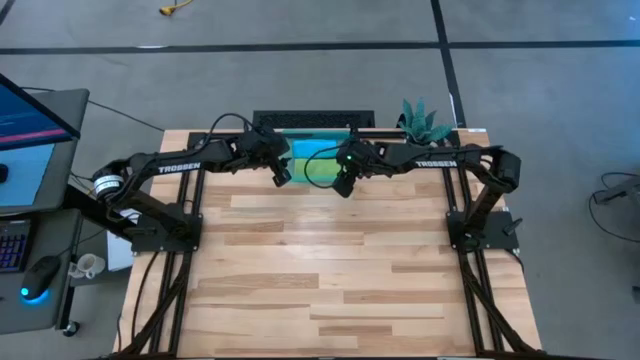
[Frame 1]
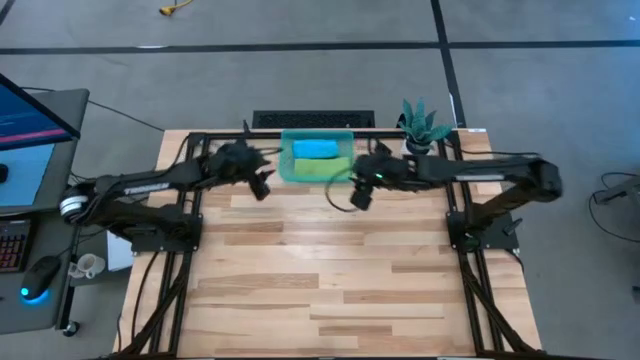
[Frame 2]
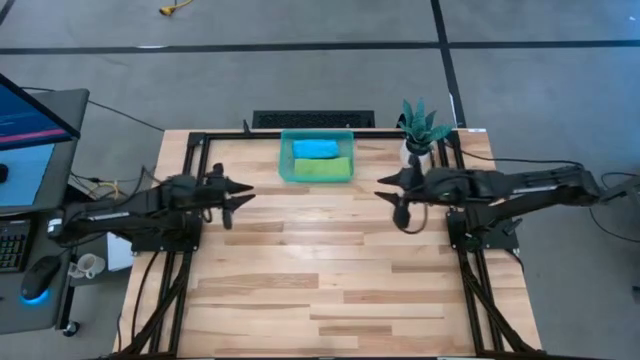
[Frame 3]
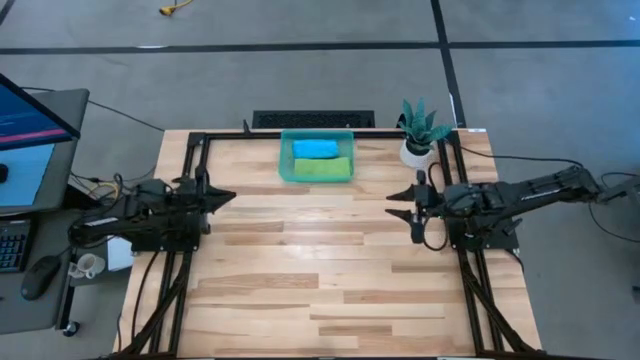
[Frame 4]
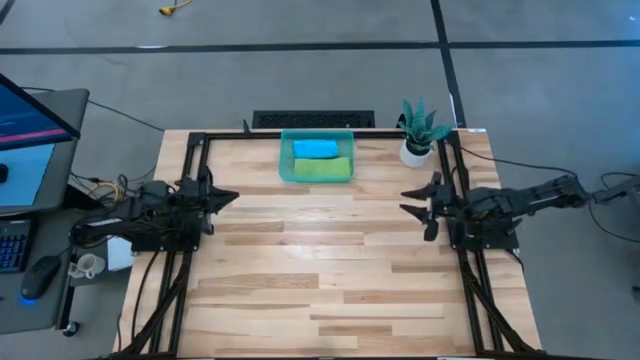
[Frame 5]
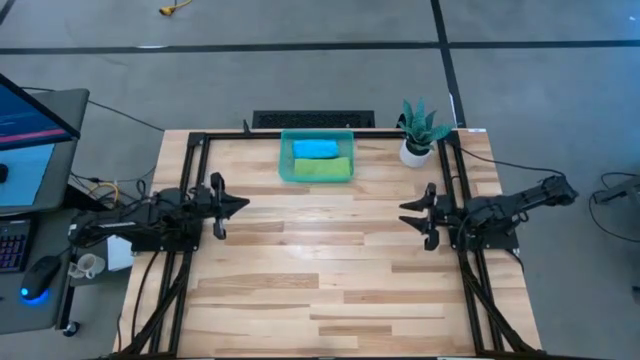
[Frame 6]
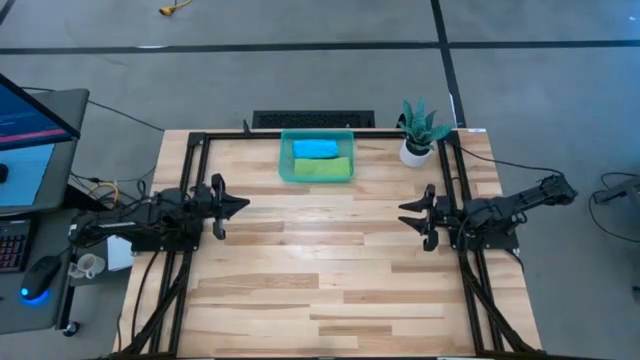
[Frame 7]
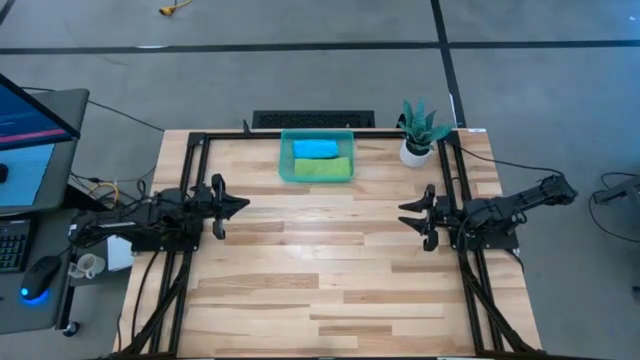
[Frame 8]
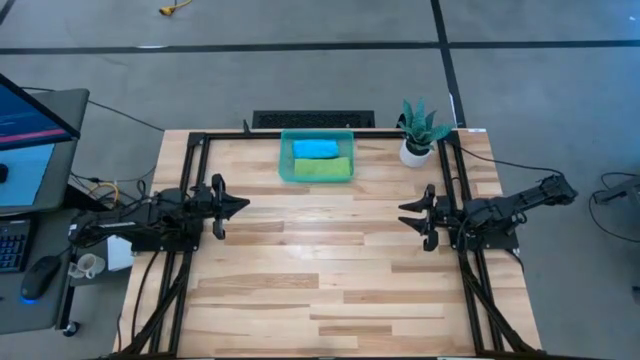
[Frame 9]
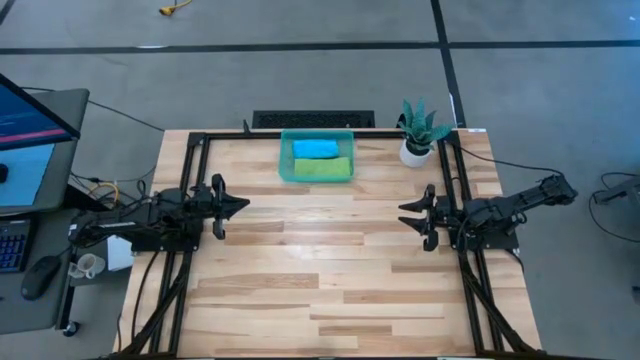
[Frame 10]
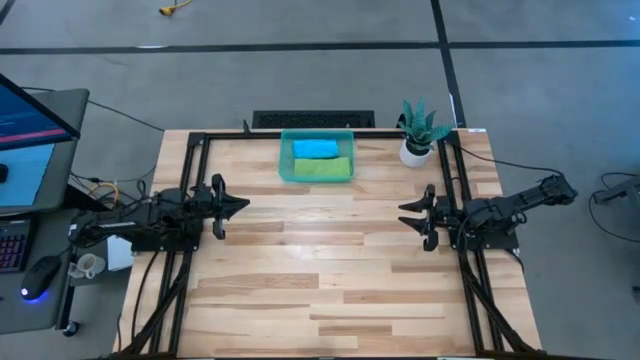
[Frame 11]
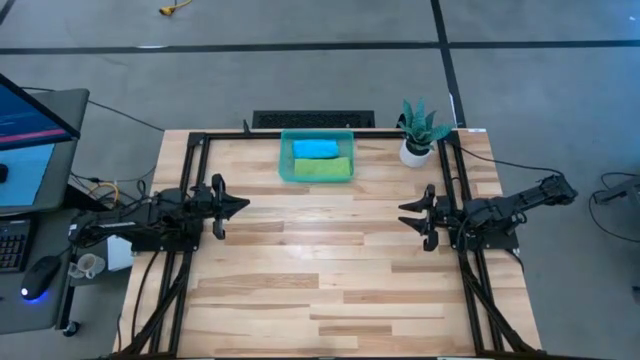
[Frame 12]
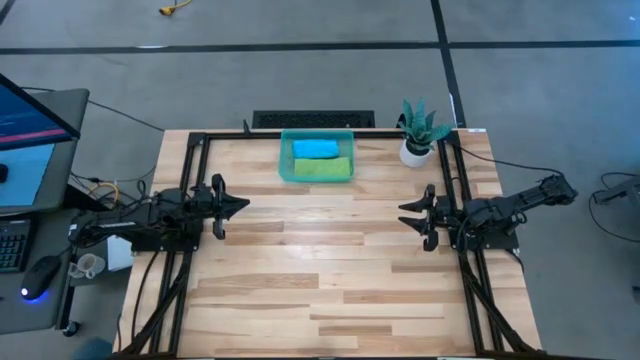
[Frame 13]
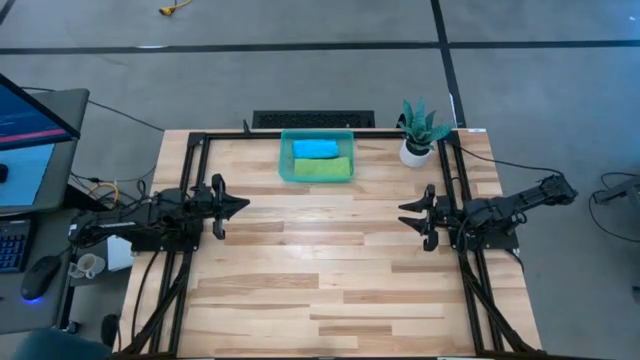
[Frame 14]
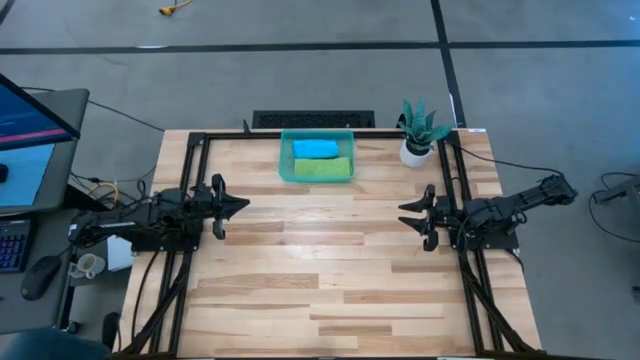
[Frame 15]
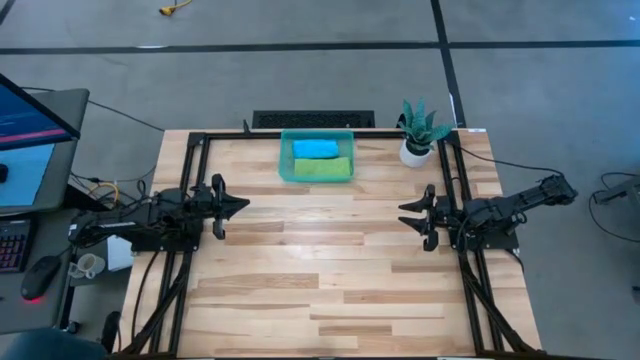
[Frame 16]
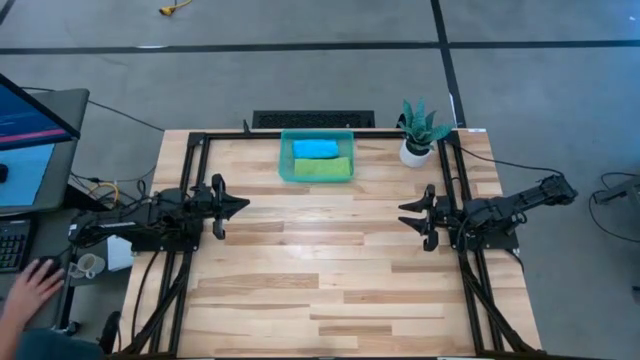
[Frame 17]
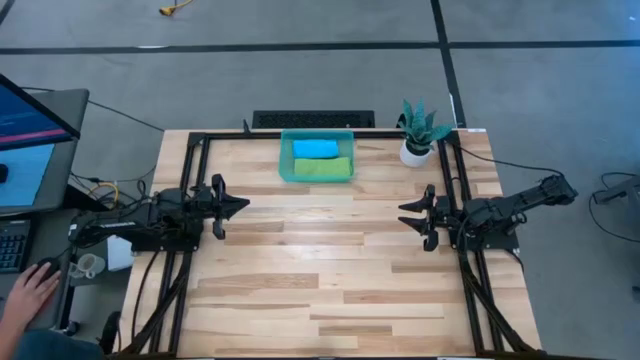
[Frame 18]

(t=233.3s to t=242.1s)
Task: Roll microfiber towels into tight, uniform cylinder then place into a basket
Return to Home Position

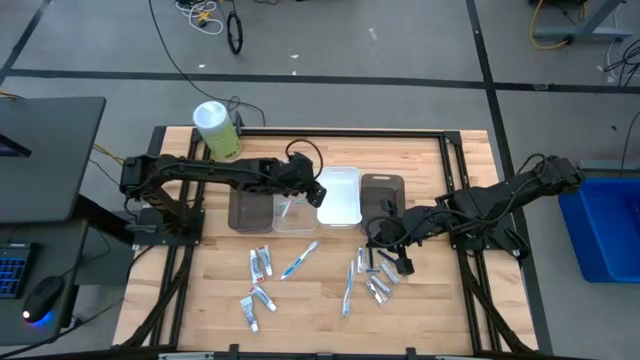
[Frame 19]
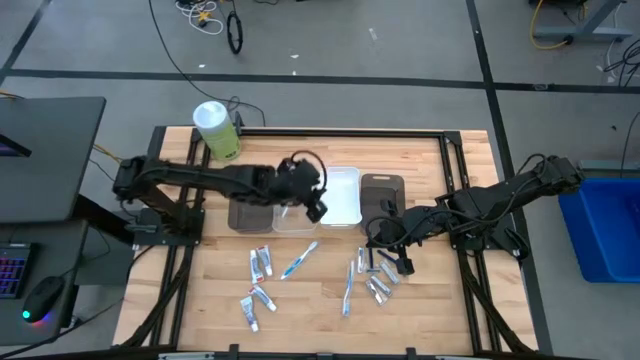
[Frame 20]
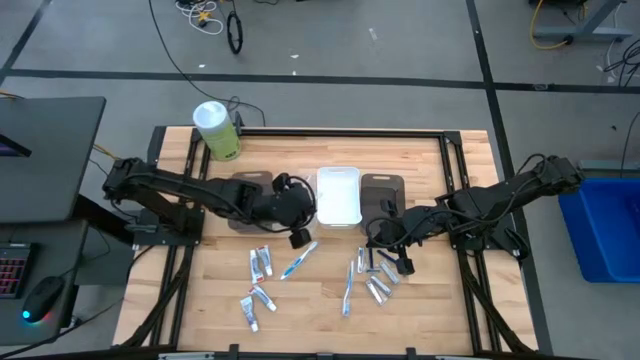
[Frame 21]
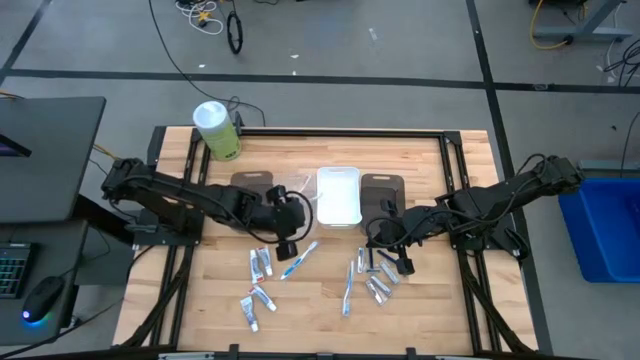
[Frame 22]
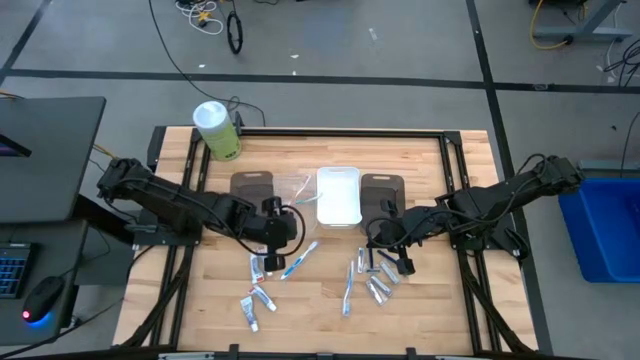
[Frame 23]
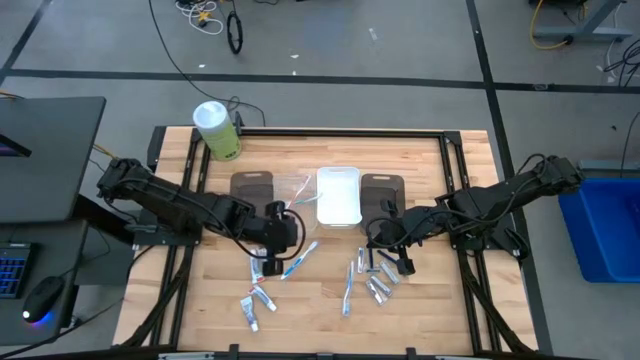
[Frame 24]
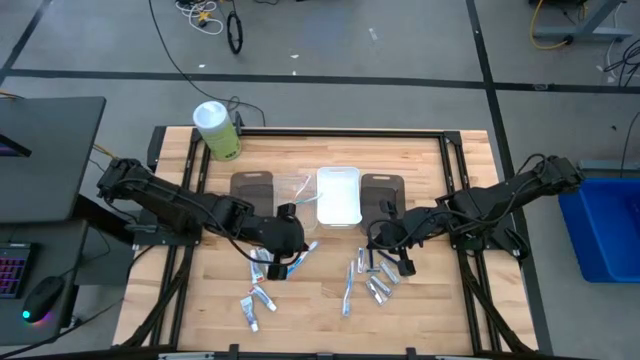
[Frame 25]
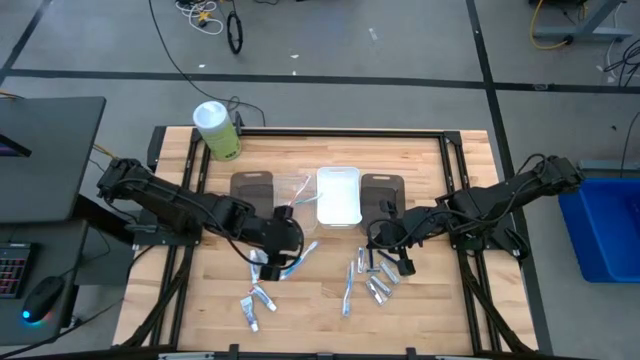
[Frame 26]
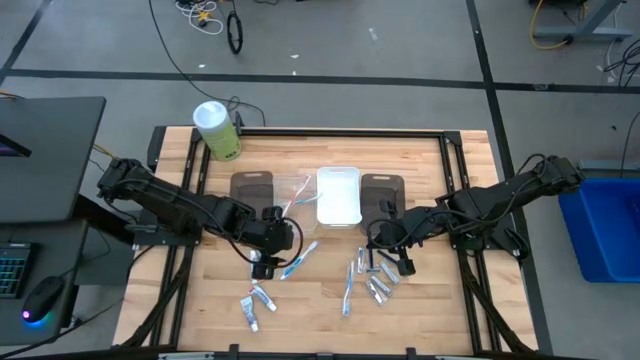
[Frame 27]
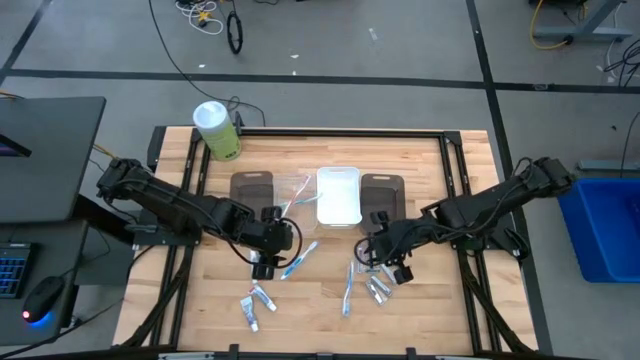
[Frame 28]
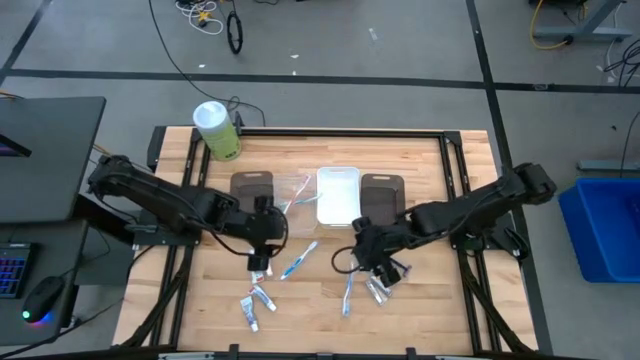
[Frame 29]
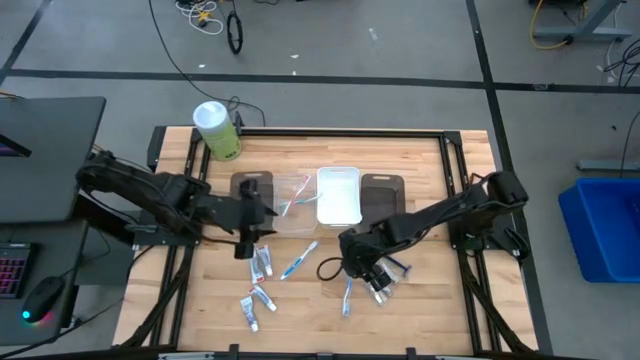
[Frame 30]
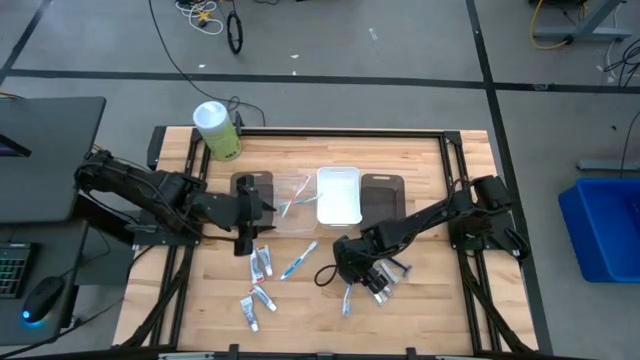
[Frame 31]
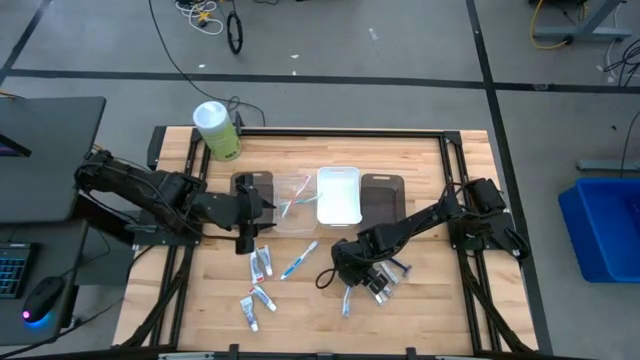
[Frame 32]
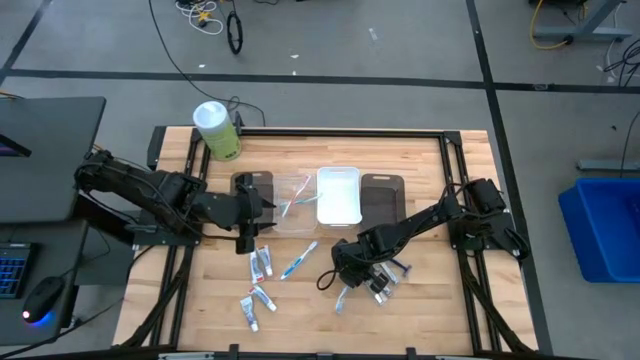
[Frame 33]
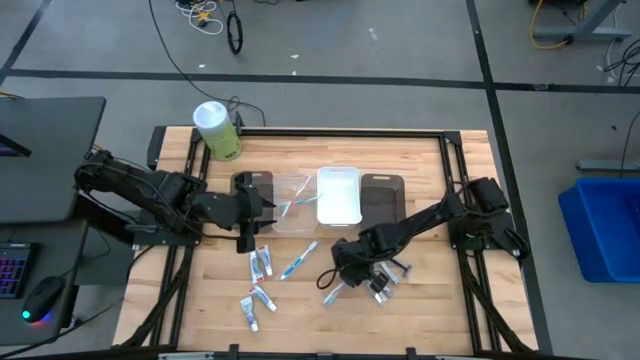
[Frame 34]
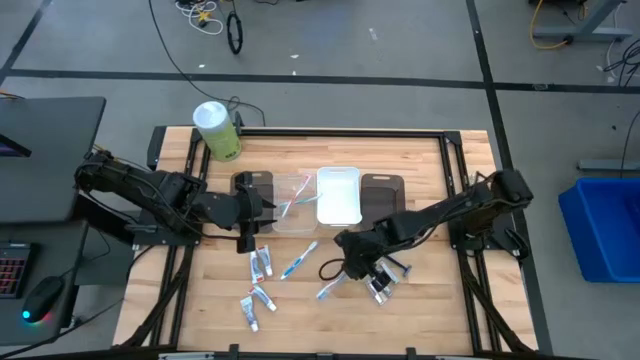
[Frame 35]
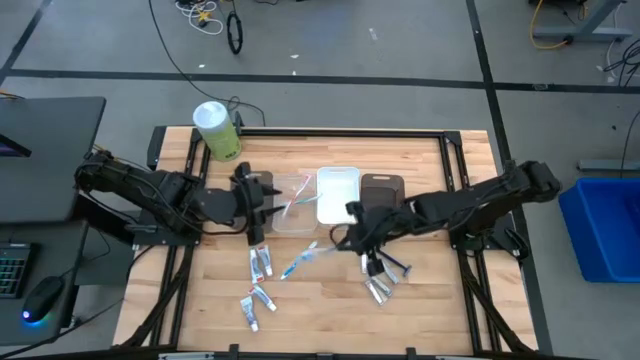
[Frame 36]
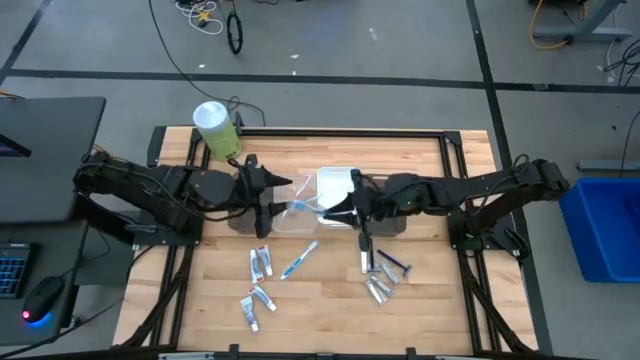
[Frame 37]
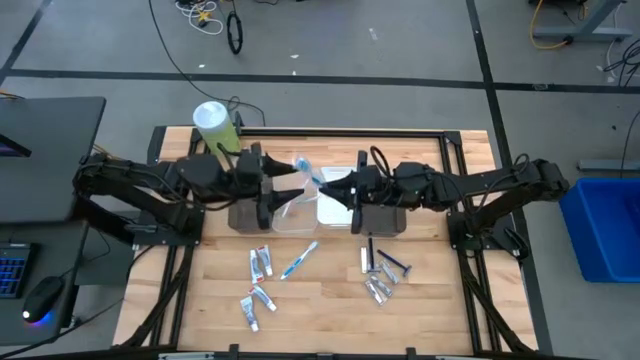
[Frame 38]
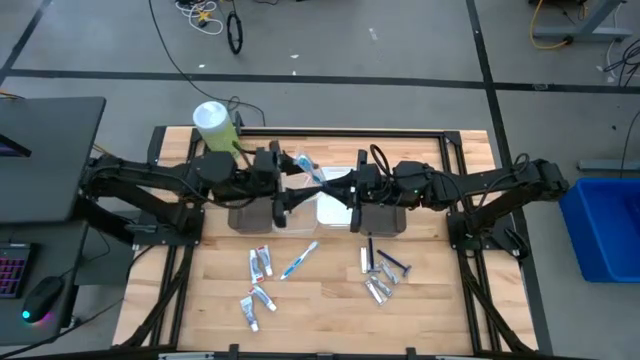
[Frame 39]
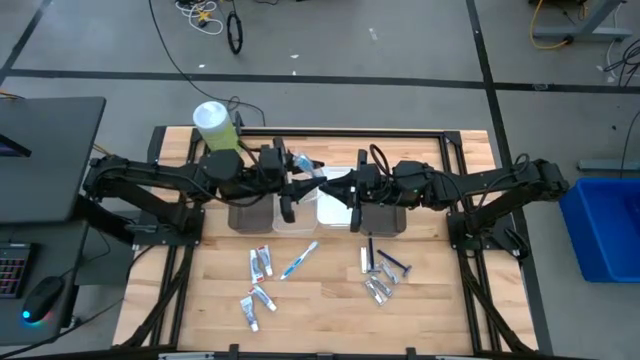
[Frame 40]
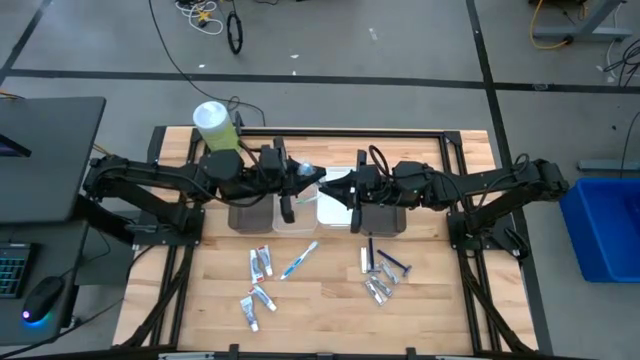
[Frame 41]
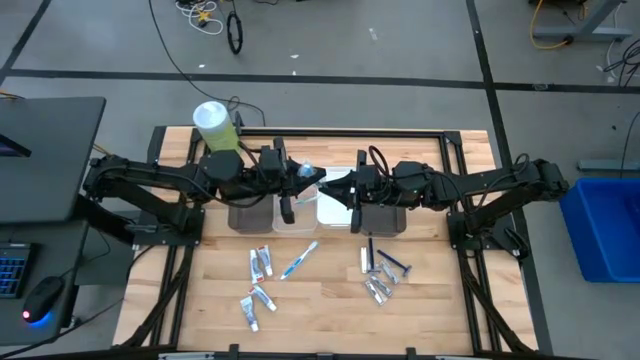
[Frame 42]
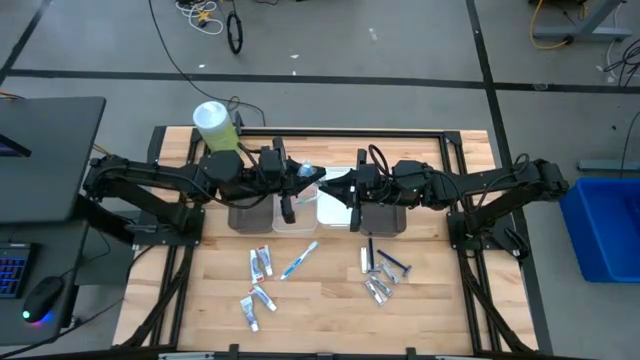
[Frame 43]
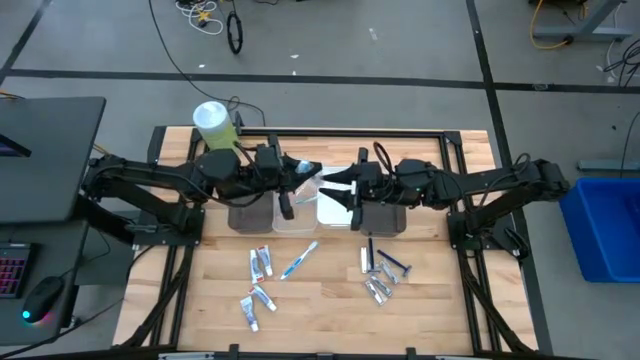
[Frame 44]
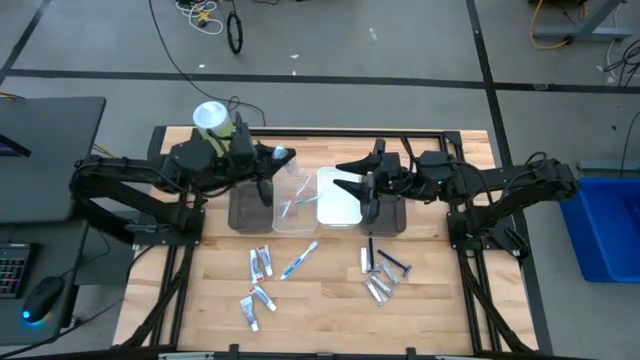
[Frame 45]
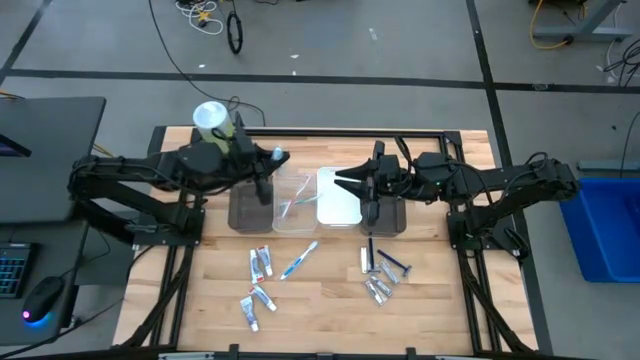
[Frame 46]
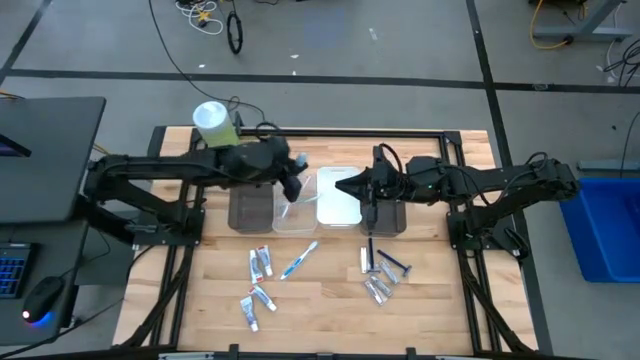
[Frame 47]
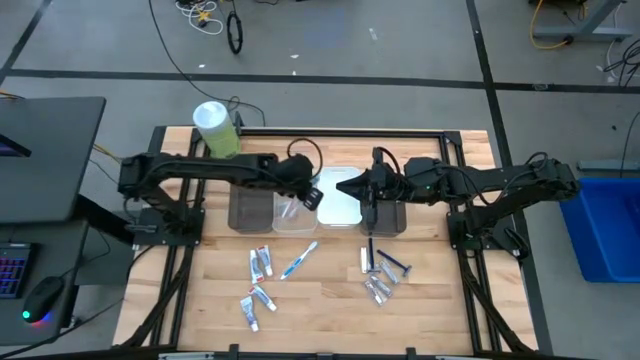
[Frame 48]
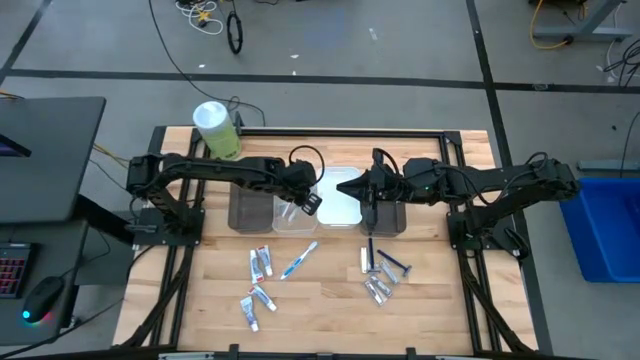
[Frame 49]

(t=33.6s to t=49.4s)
Task: Pick & Place Travel size toiletries
Put the blue toothbrush into the transparent bin
